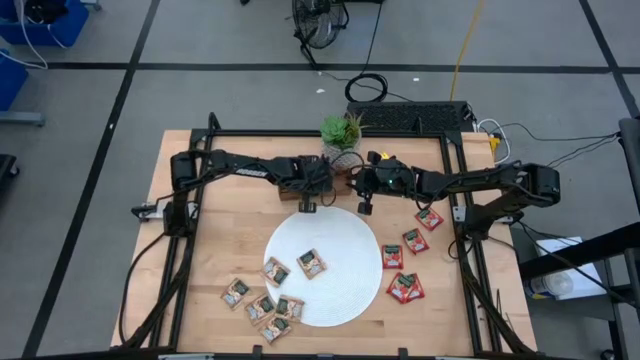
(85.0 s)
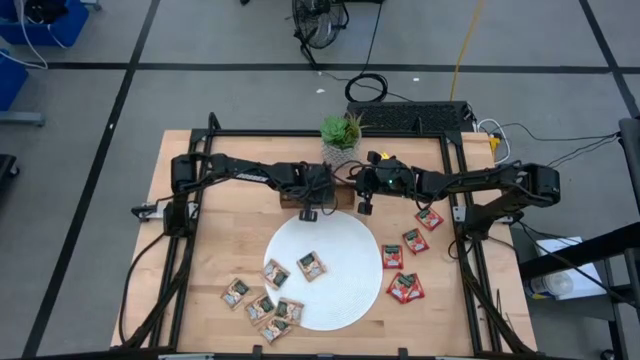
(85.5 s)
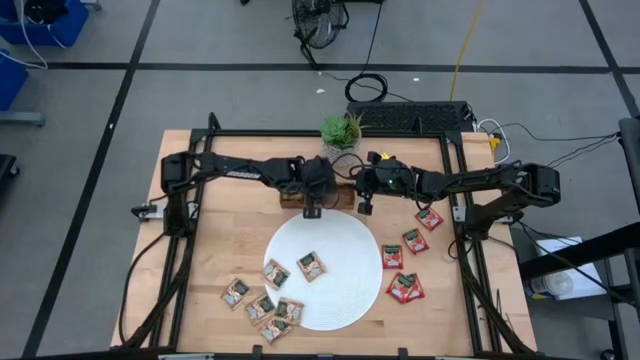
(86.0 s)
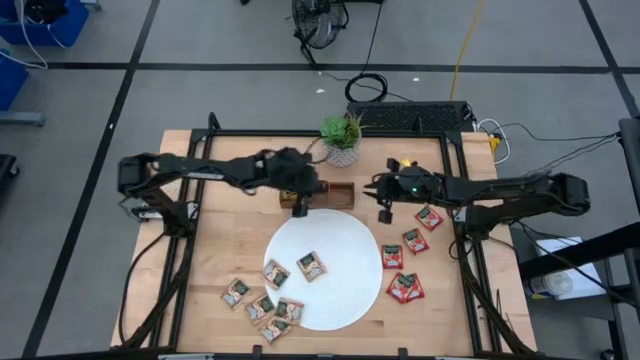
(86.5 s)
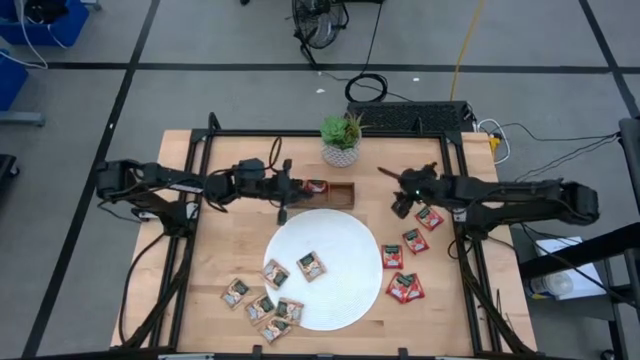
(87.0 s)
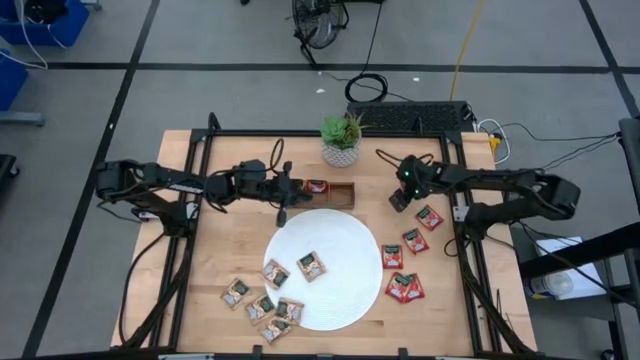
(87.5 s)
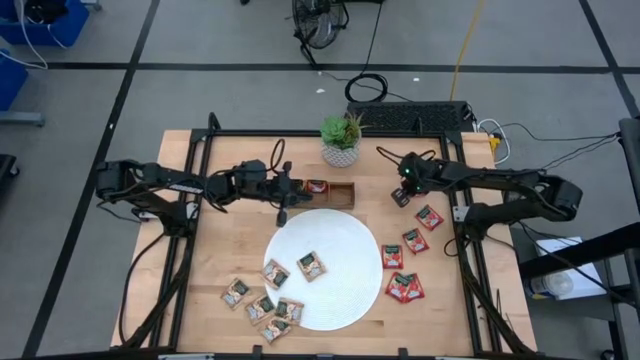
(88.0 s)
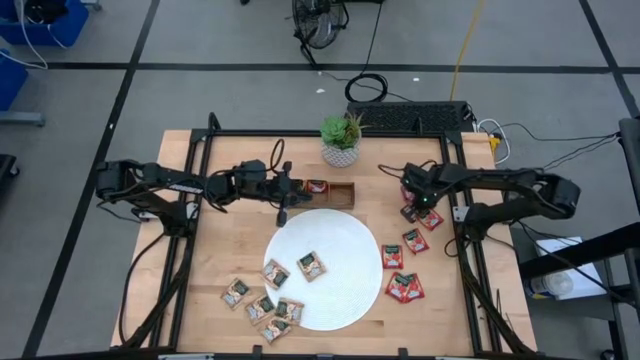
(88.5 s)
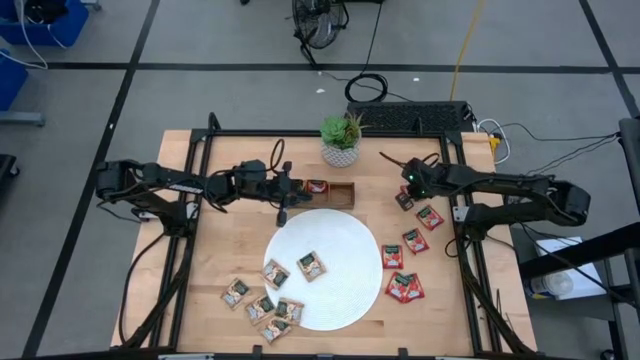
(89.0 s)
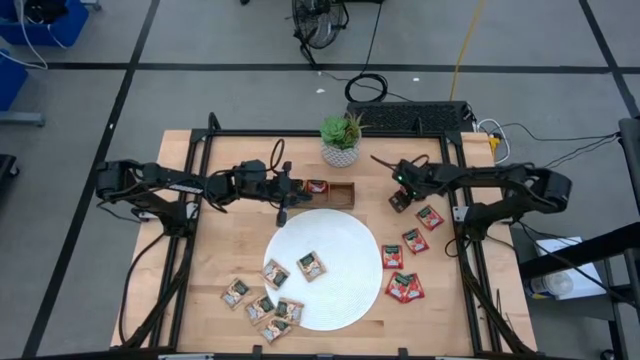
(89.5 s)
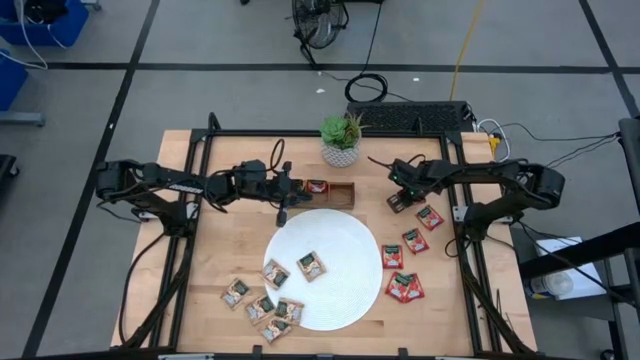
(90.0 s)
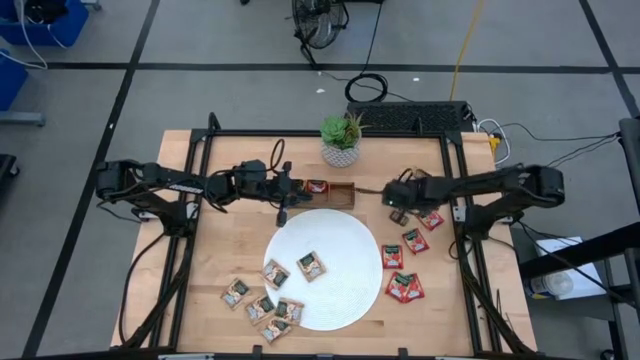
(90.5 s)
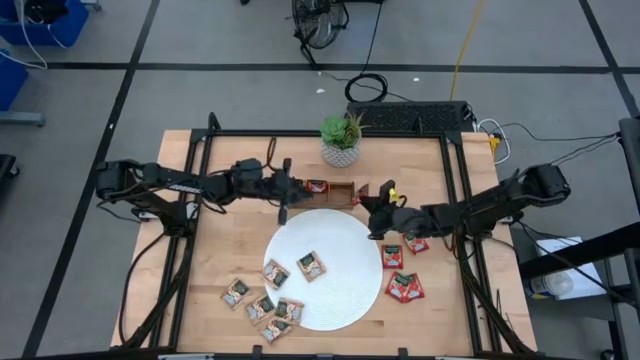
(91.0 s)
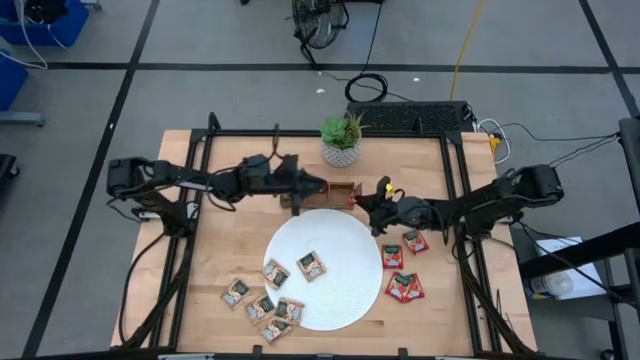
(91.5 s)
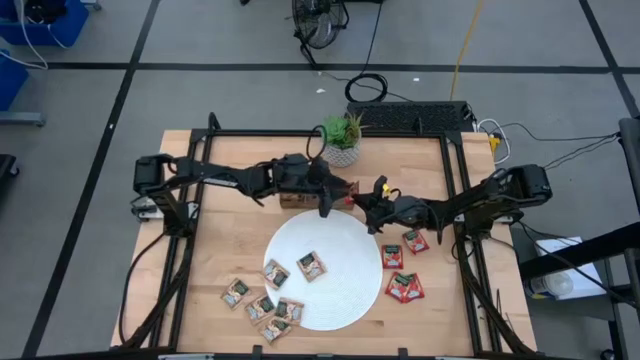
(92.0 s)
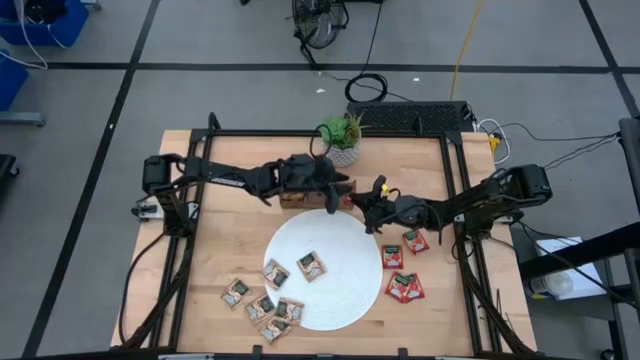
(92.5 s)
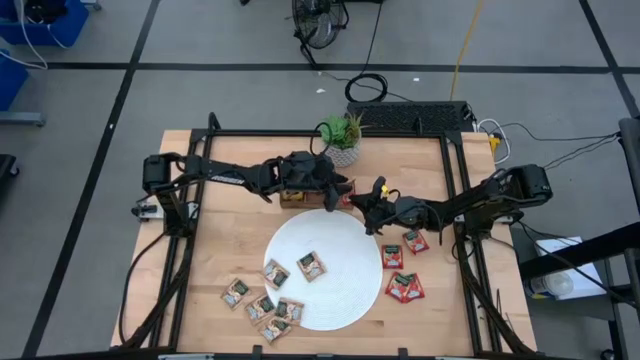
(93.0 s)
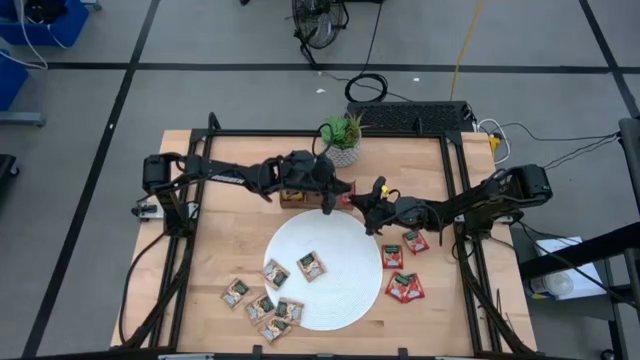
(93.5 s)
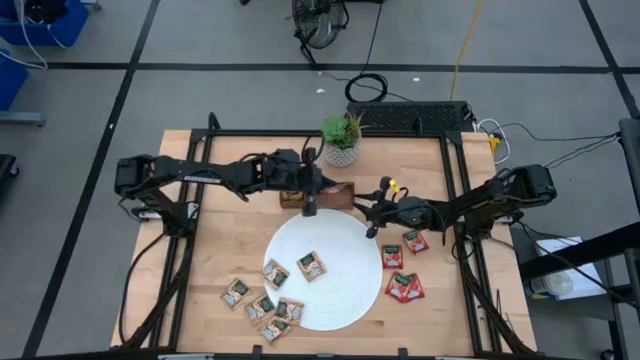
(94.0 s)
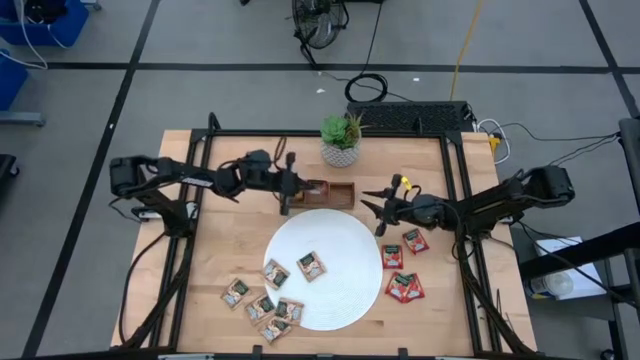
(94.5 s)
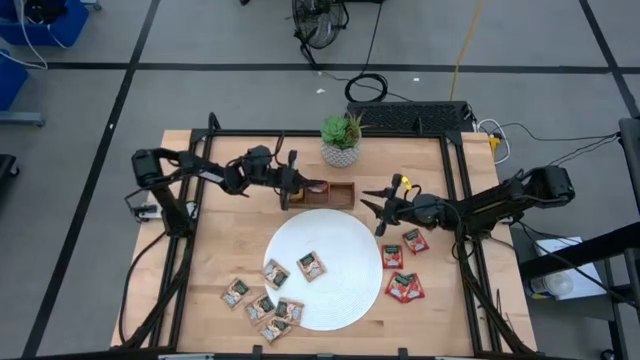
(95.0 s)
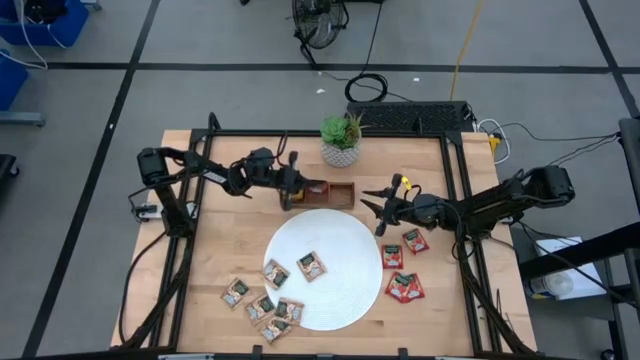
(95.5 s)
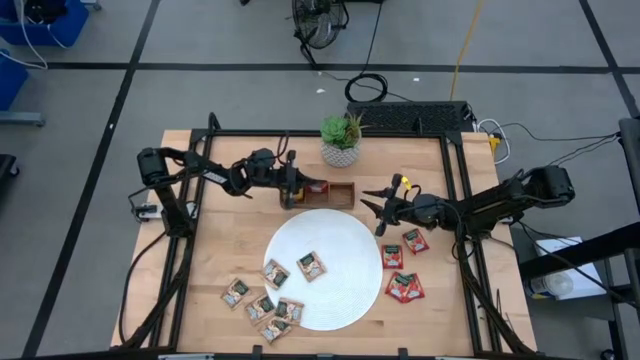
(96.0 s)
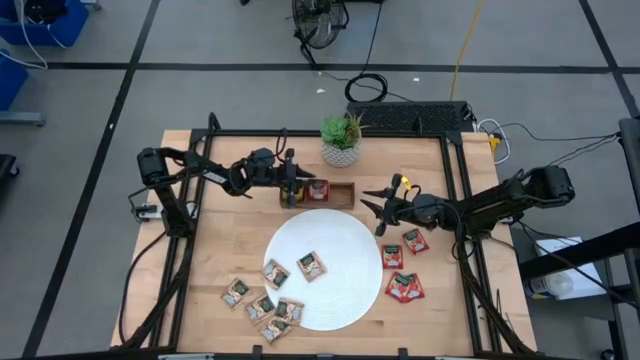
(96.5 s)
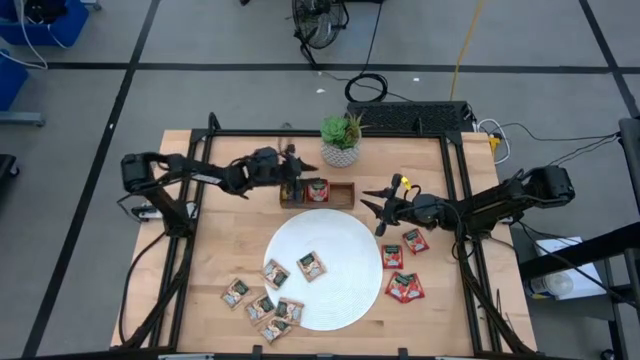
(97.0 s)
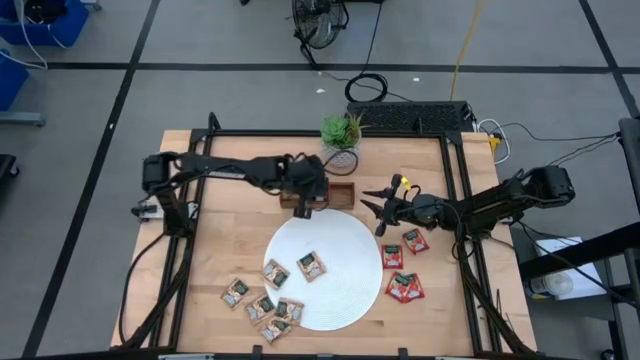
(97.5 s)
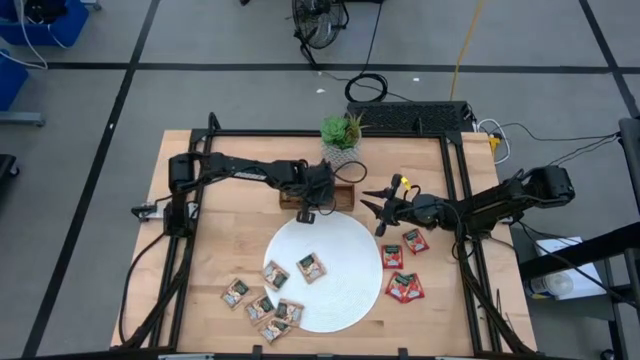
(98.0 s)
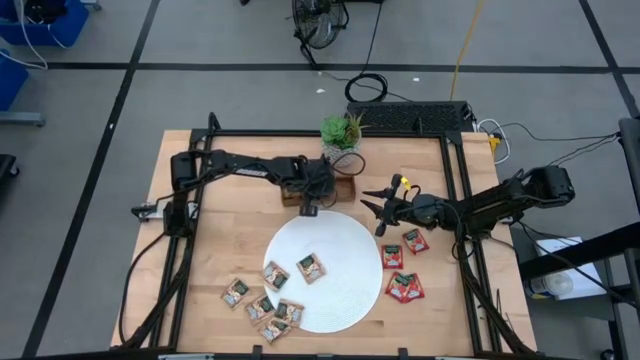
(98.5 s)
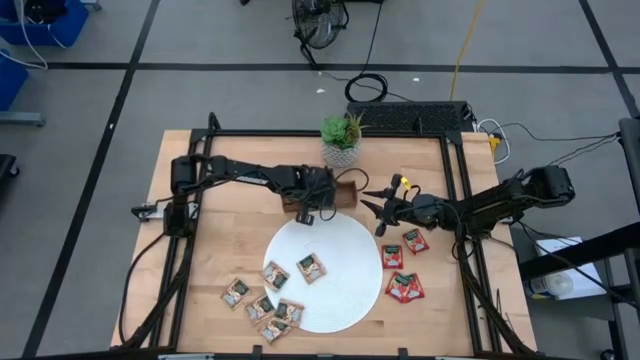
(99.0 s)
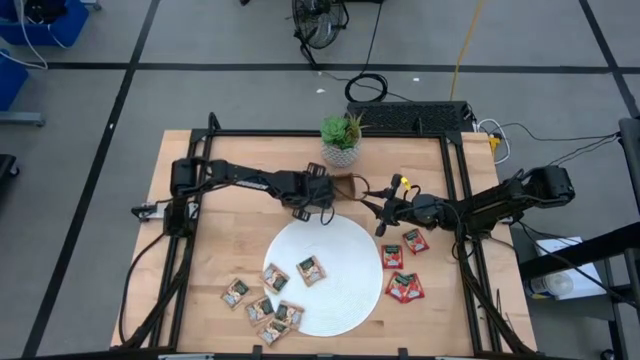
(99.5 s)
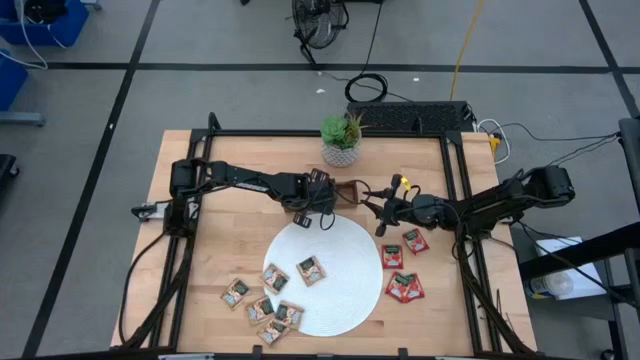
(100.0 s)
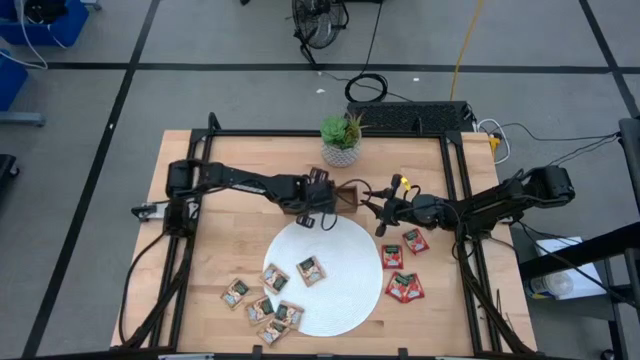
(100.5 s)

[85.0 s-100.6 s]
Task: Pick & Place Tea
Put the strawberry tea bag into the wooden organizer

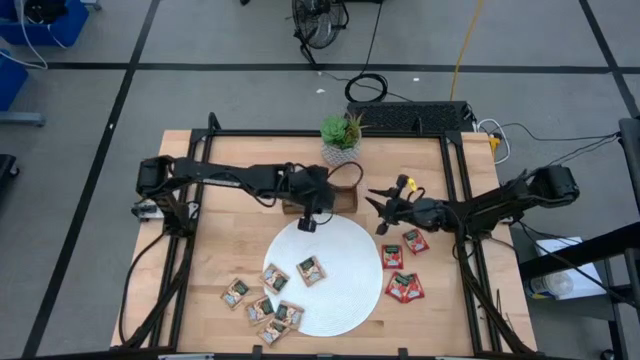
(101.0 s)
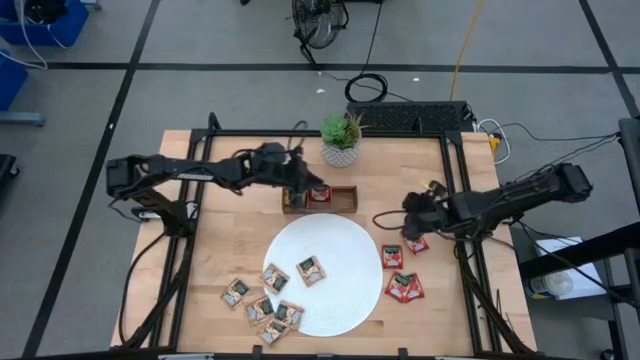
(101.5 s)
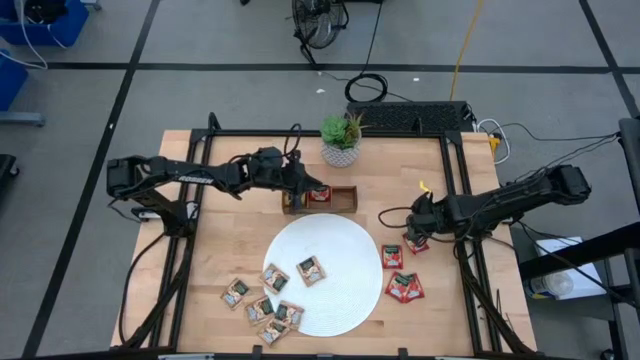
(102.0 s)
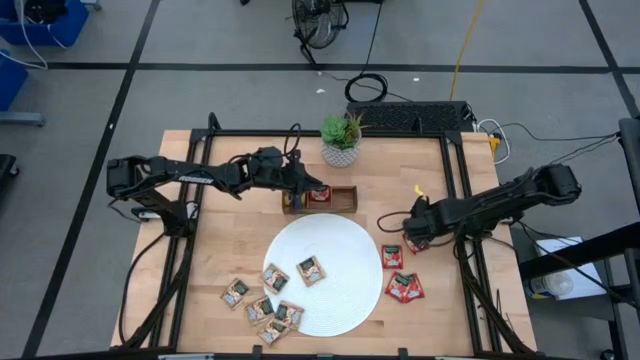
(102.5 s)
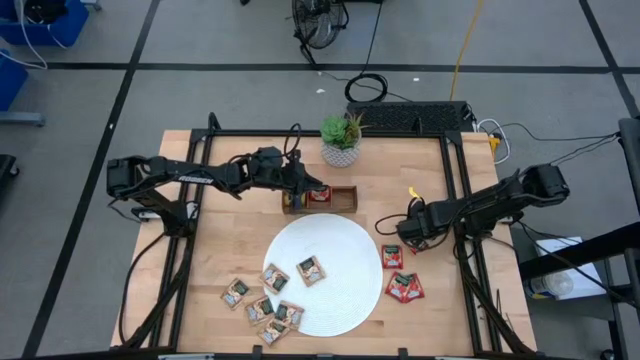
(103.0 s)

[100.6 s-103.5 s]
Put the strawberry tea bag into the wooden organizer

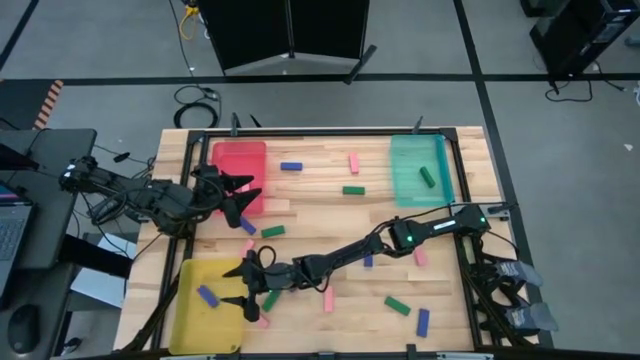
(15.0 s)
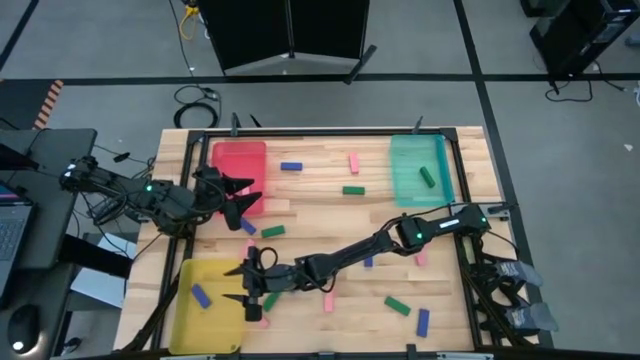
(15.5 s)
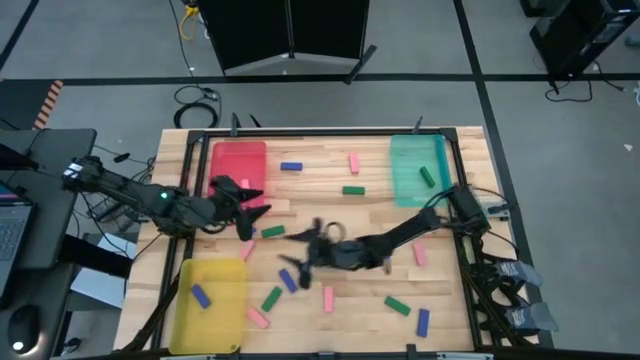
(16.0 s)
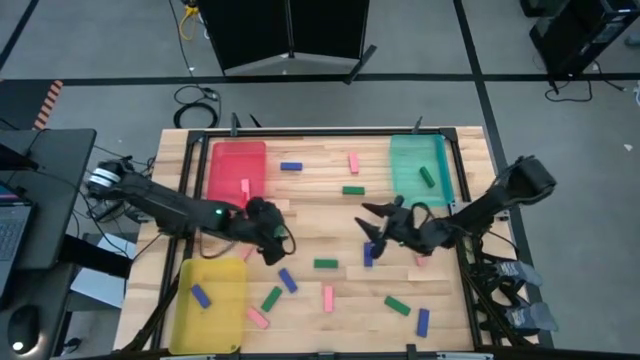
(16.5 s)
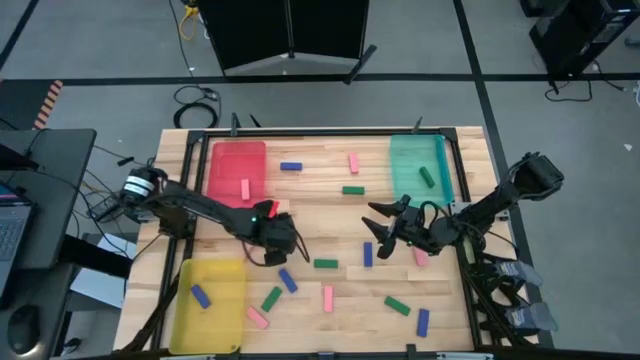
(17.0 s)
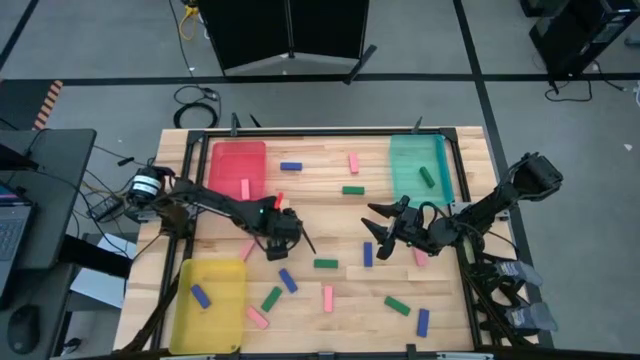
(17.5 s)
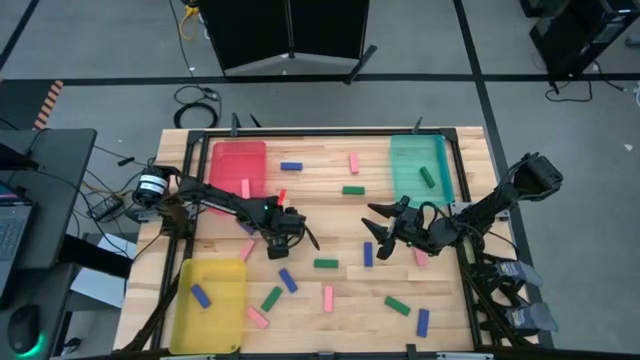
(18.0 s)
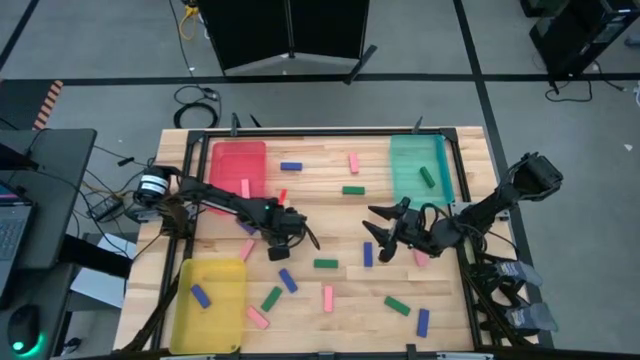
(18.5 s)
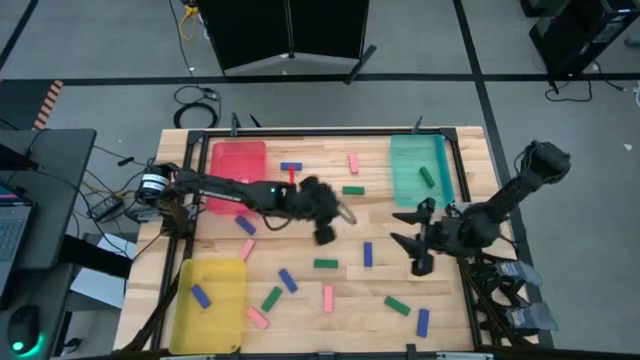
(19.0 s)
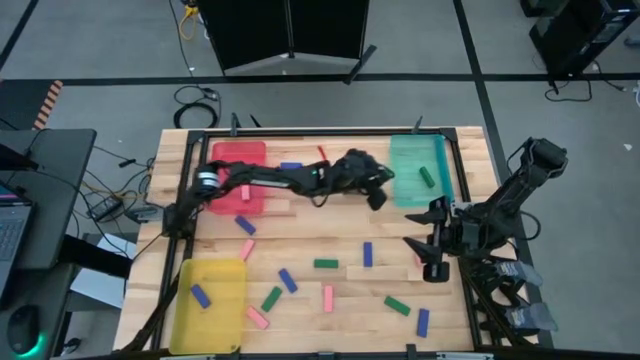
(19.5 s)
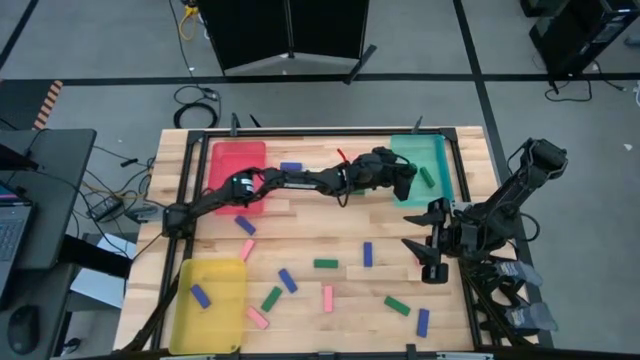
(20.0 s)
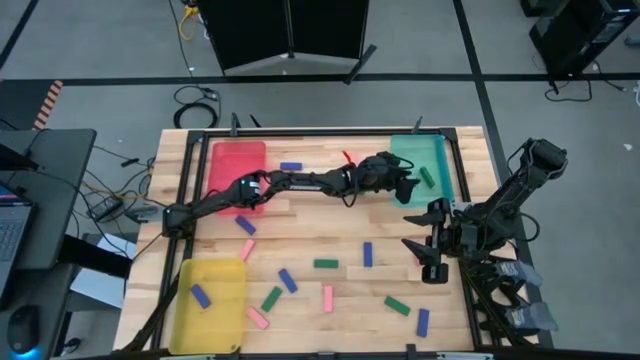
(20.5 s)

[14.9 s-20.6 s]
Task: Sort blocks
Put the green block into the blue bin
